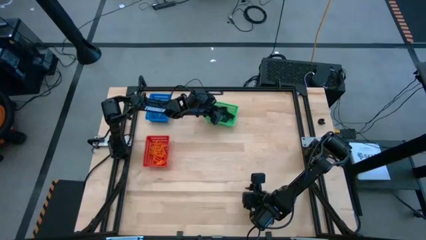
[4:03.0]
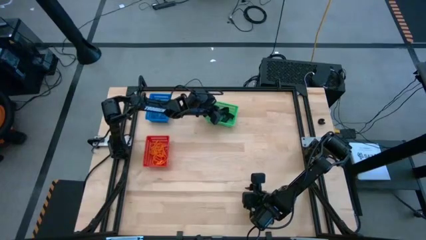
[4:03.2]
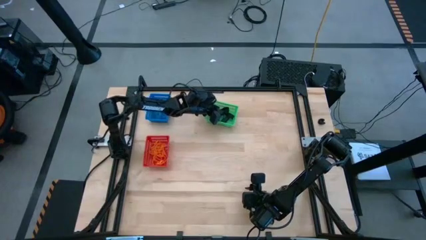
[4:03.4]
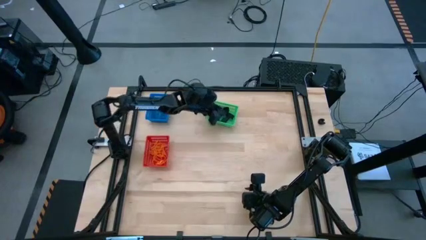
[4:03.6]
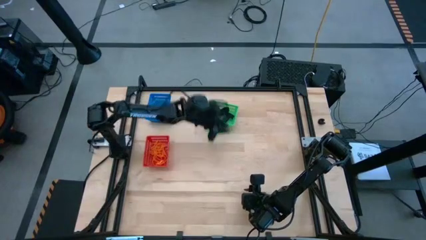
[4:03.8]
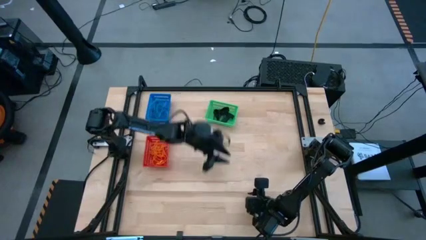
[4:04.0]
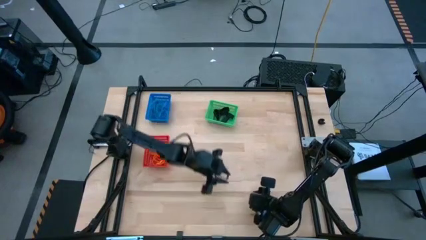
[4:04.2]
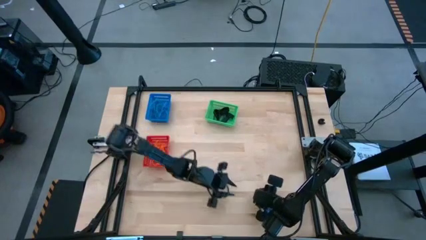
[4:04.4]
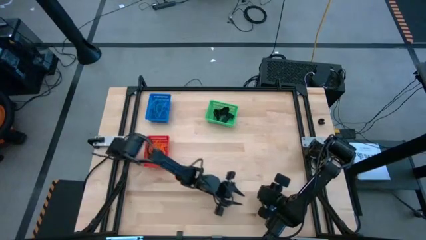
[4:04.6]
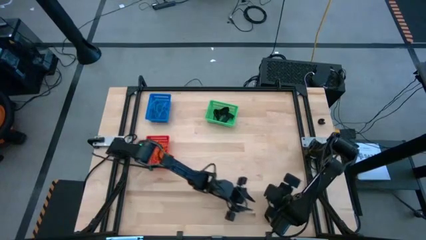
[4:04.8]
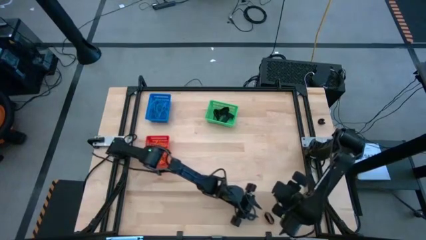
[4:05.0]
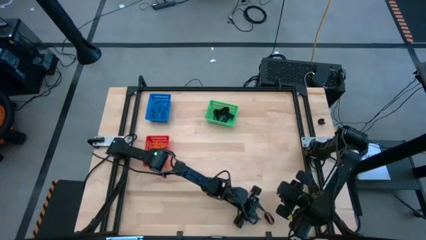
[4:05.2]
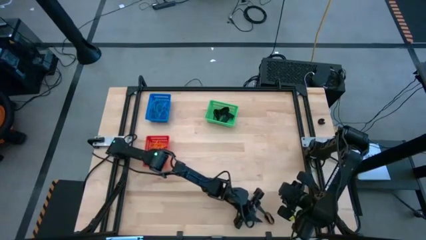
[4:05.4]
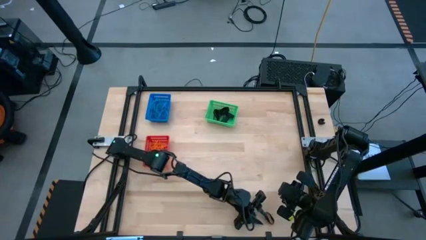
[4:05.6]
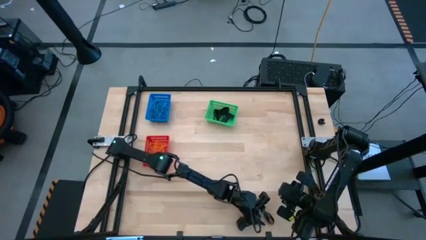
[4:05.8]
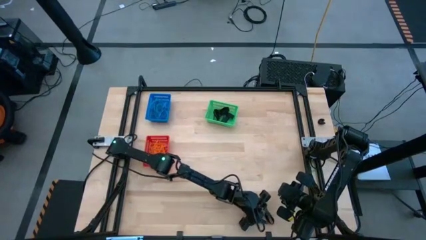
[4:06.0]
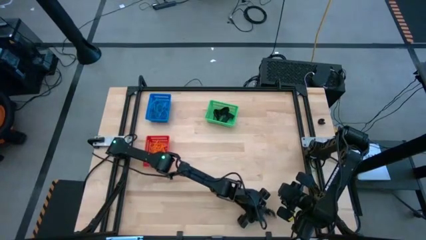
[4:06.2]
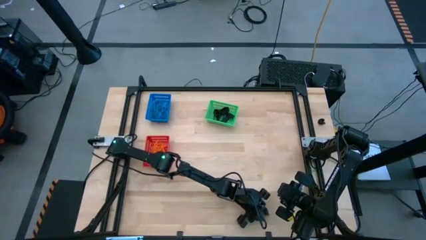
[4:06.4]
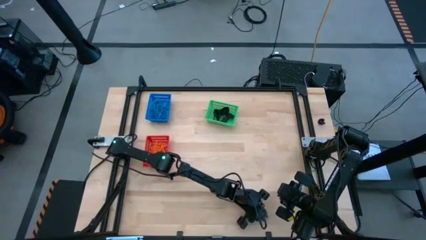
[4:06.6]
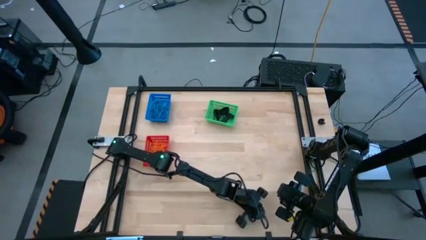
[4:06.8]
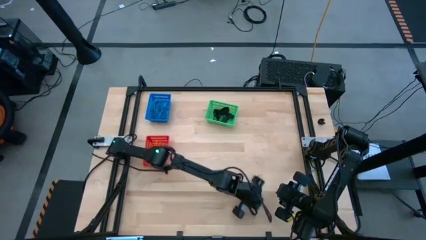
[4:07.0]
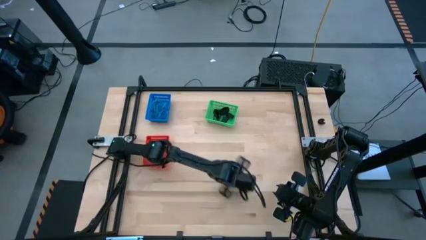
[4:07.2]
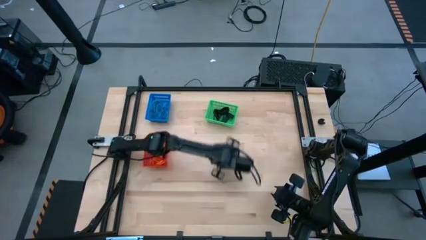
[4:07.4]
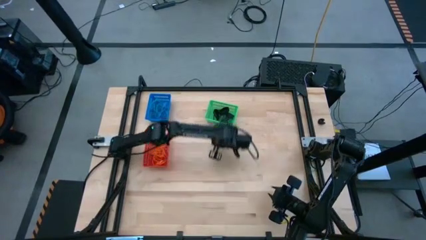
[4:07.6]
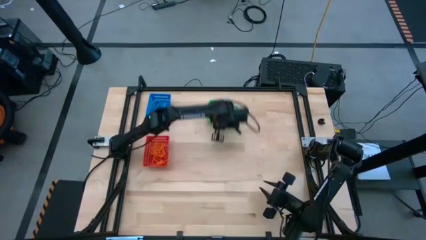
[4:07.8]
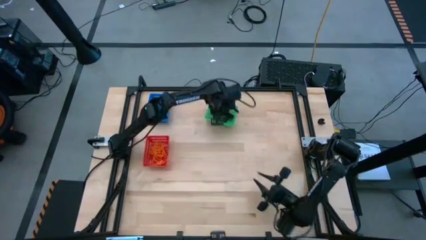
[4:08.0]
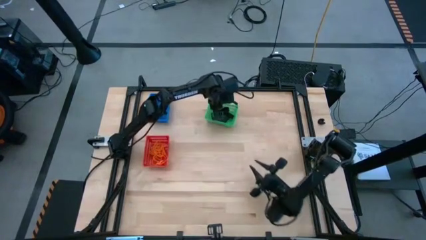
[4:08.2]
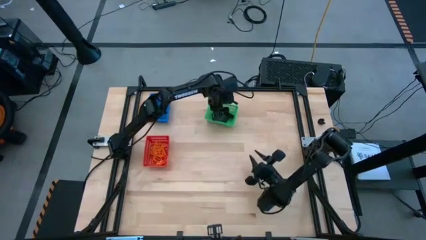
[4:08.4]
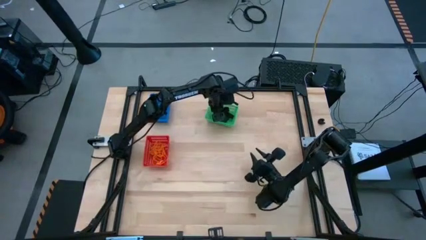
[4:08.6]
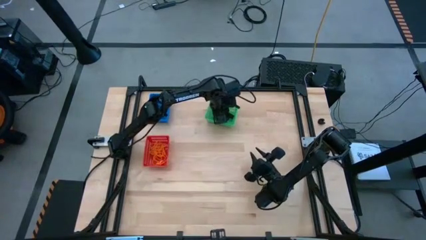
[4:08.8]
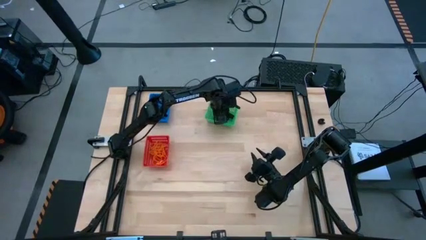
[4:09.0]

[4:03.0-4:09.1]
Task: Sort rubber bands into baskets
Put the black rubber band into the green bin

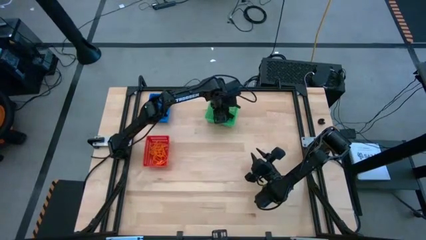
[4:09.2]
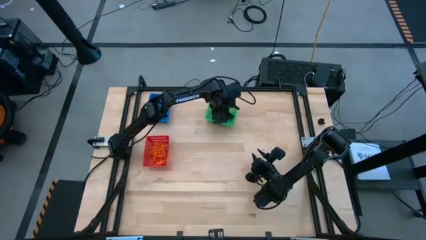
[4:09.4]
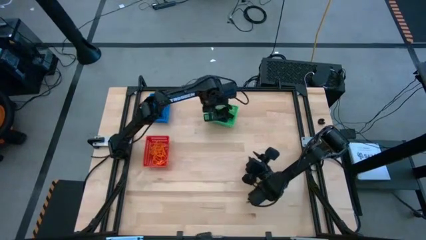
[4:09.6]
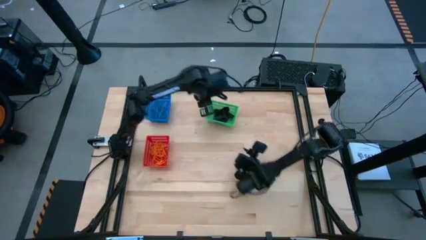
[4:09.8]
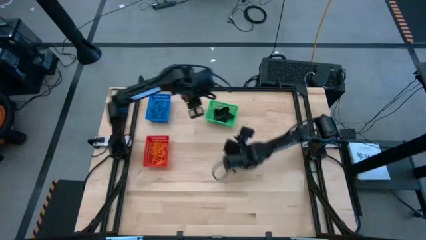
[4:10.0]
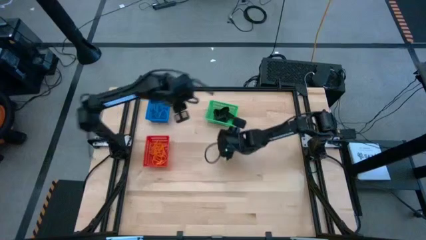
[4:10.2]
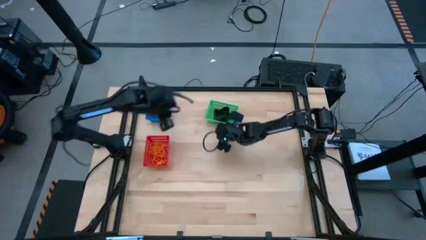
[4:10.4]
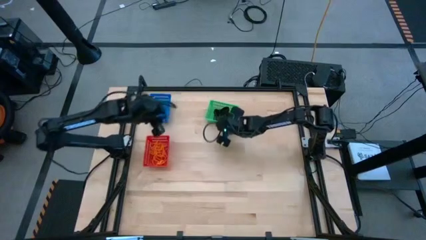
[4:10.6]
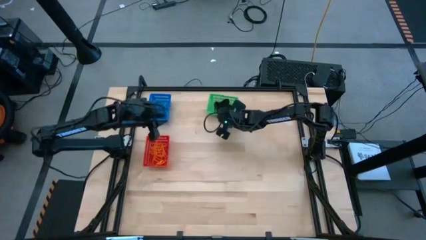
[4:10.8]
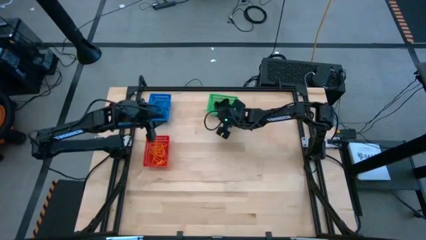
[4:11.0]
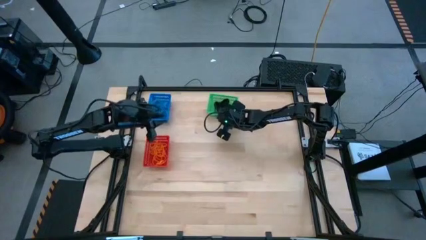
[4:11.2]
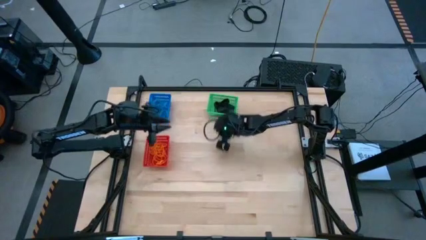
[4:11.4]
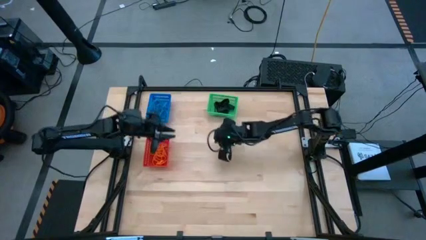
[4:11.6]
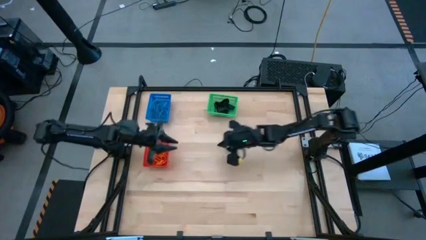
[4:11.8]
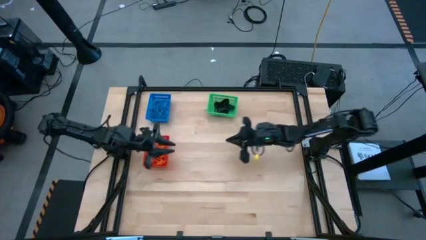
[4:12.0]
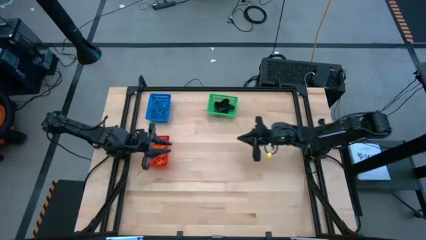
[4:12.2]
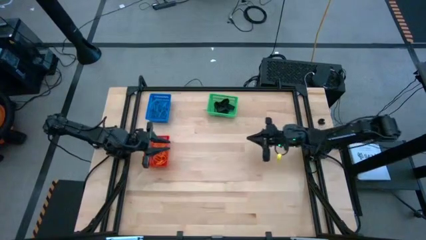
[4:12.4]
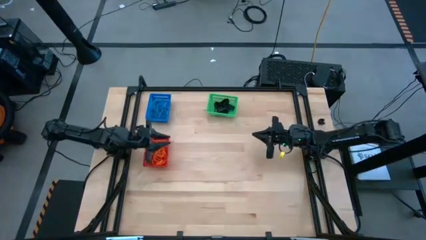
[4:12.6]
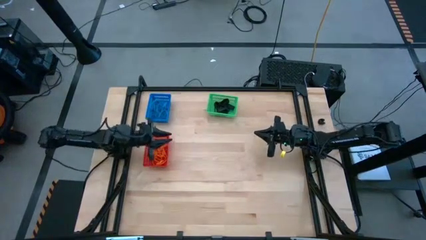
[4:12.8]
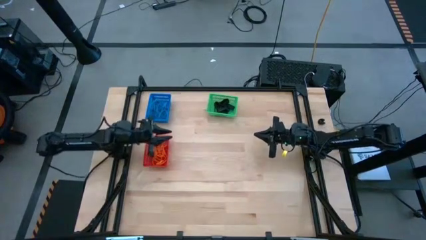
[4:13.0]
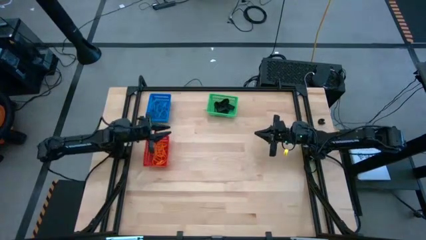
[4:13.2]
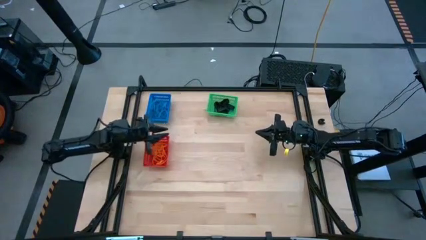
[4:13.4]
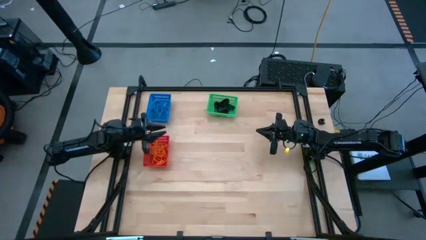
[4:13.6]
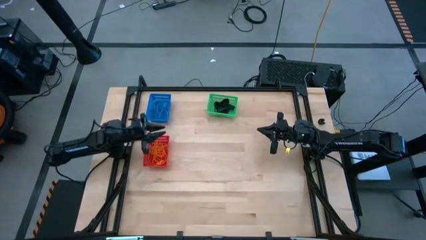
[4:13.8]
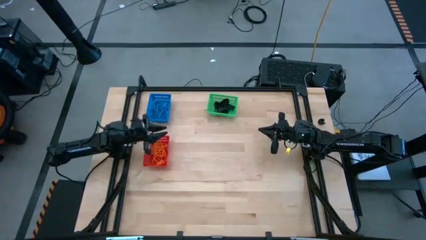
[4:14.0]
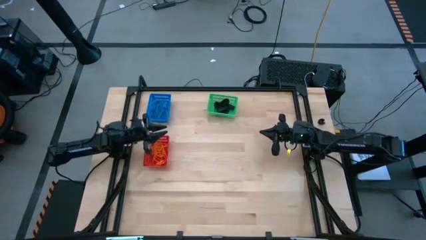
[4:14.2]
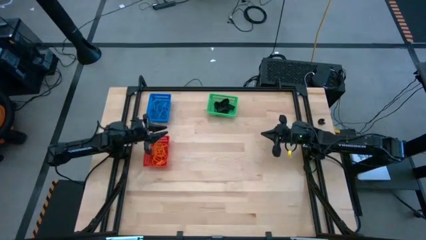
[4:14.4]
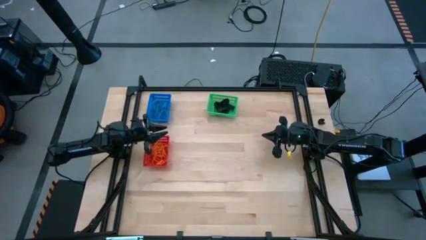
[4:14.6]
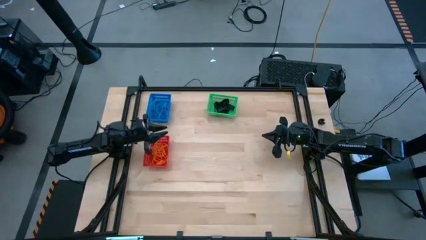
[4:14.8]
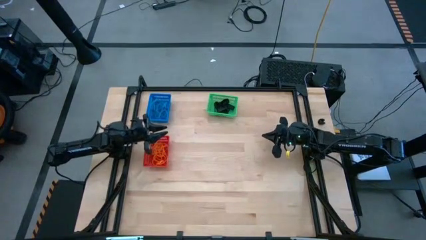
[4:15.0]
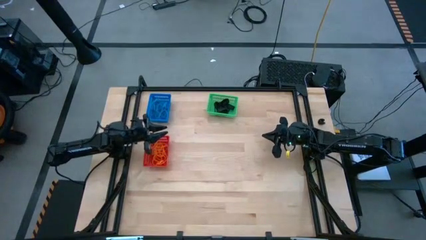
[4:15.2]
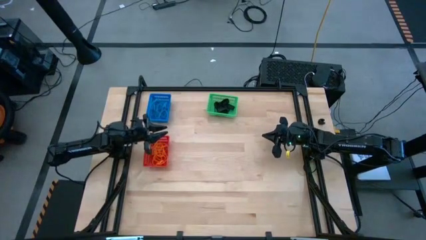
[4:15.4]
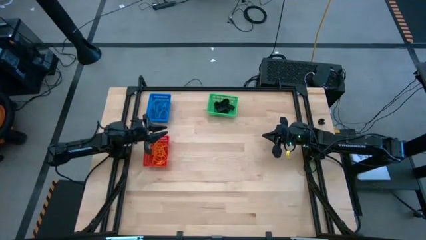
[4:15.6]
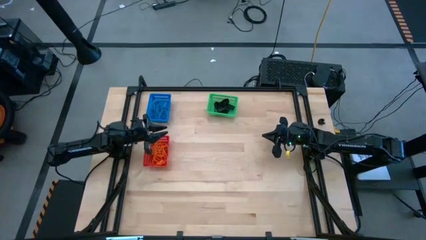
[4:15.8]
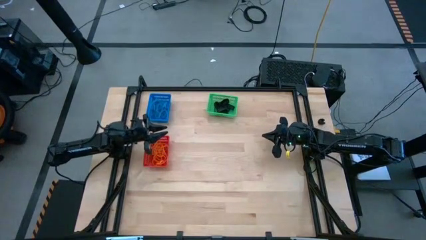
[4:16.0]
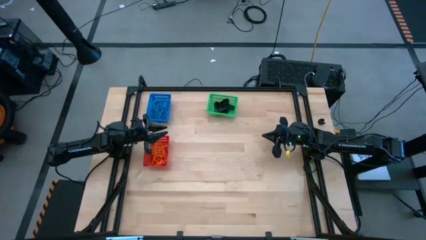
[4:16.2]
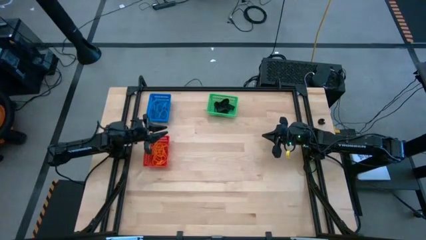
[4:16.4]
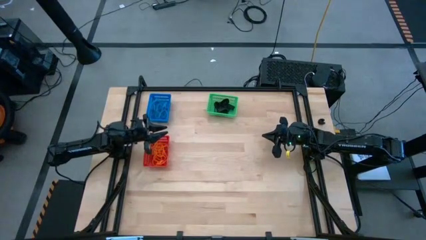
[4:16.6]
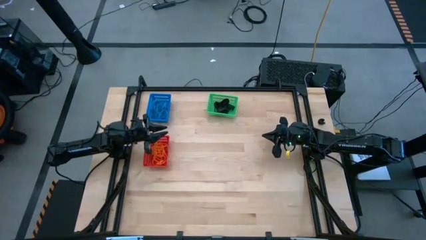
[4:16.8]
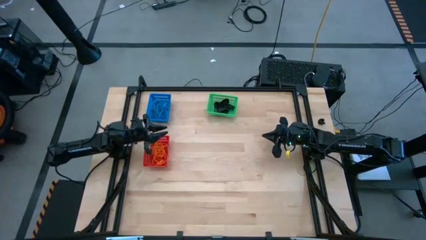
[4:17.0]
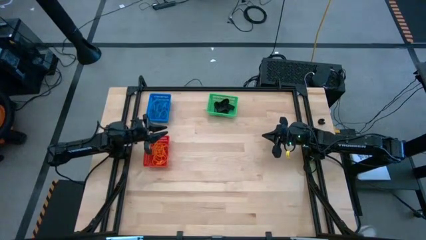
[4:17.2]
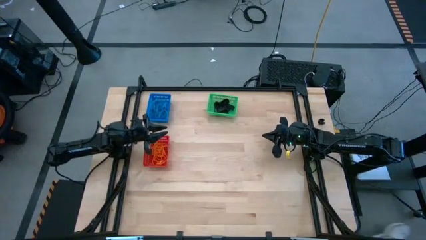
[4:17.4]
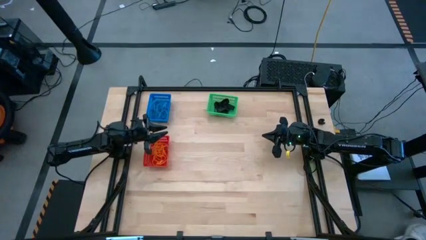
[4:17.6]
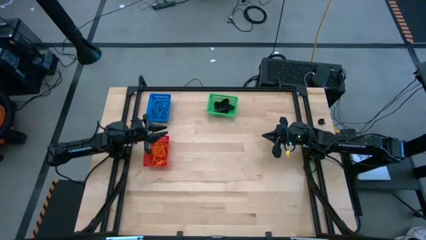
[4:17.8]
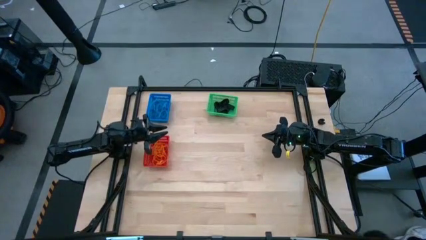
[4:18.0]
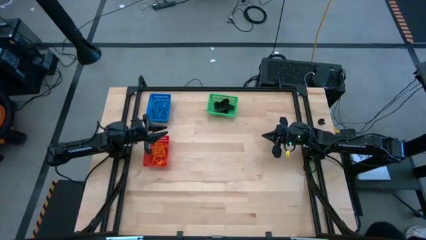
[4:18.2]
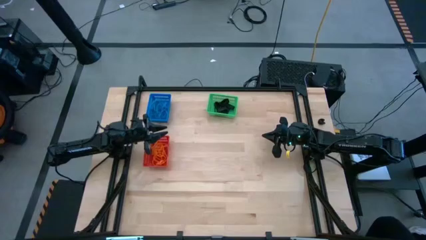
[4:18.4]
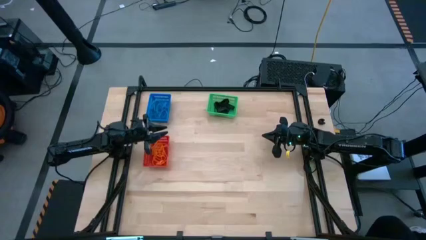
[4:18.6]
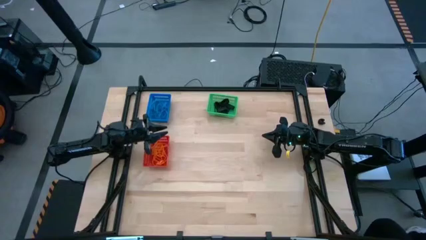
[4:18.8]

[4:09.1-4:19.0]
Return to Home Position

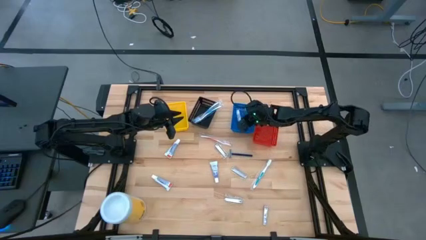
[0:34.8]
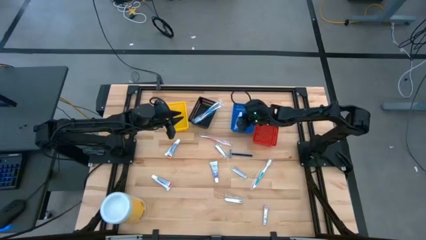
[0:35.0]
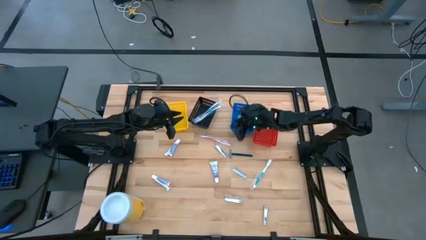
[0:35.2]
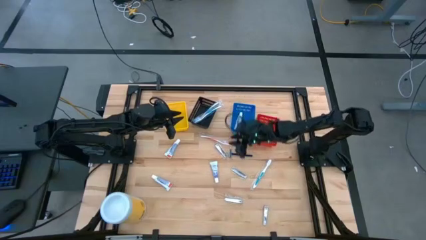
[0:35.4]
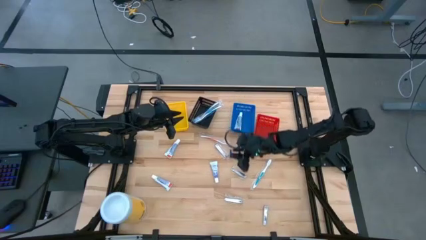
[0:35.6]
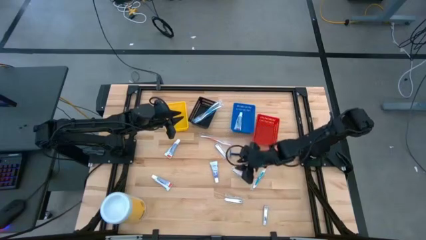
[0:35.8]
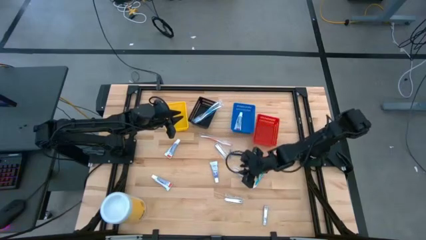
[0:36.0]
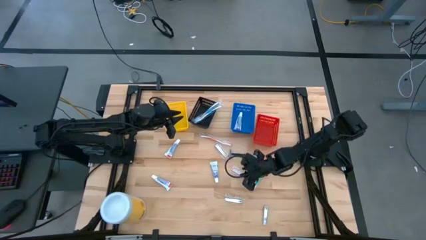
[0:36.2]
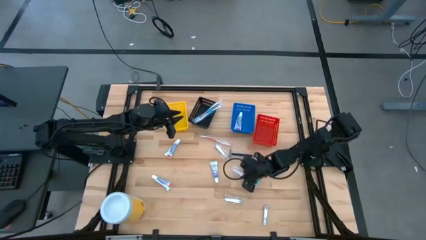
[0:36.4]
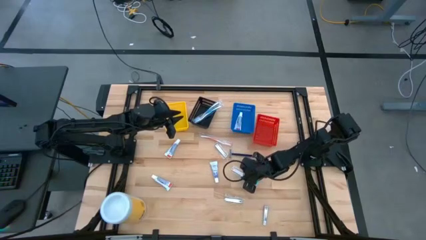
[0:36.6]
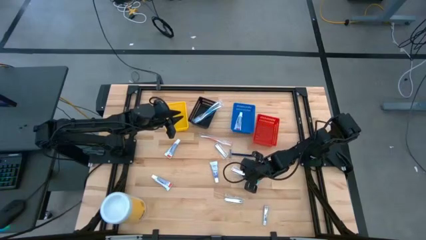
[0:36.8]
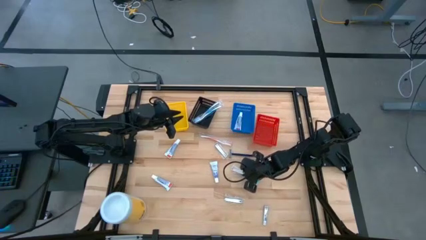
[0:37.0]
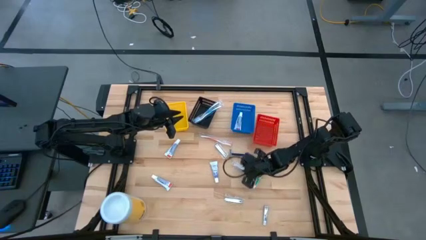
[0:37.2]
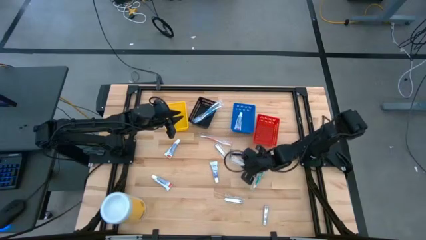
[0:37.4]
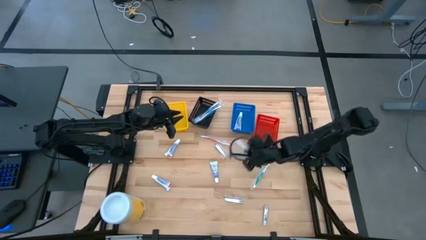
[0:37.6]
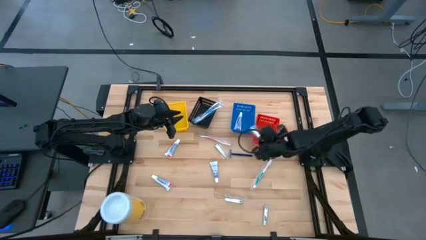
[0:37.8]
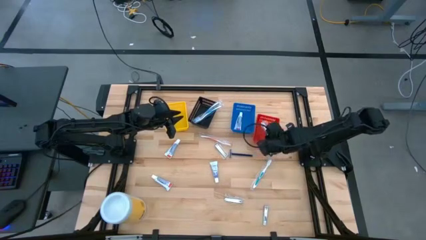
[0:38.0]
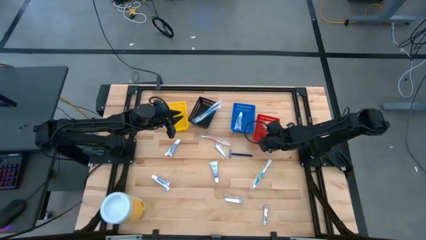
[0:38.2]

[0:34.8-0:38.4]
Task: Pick & Place Travel size toiletries
Put the silver nail cutter into the red bin
